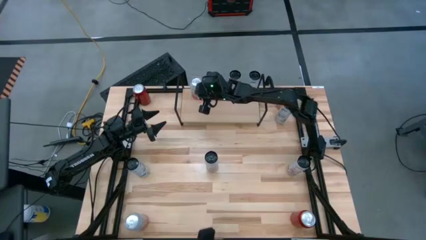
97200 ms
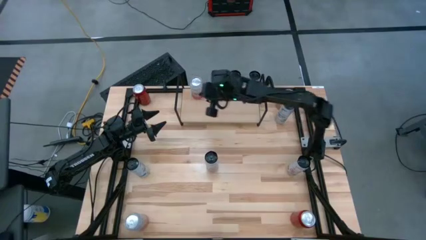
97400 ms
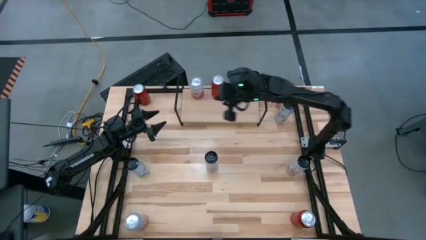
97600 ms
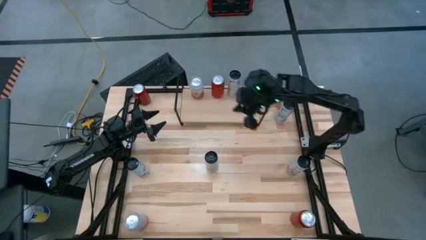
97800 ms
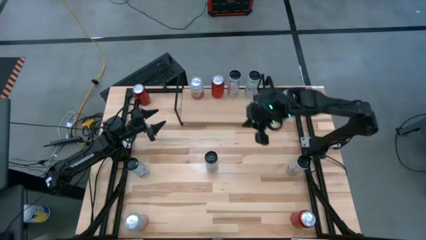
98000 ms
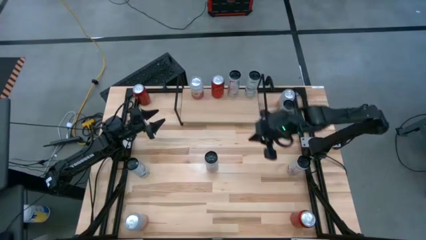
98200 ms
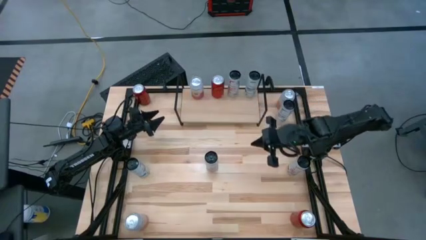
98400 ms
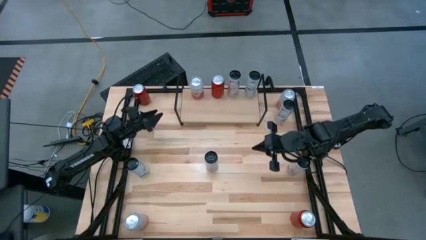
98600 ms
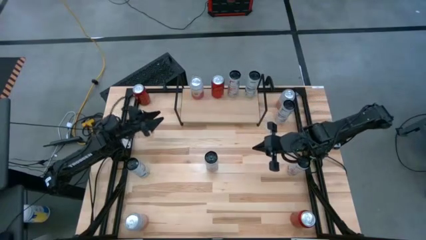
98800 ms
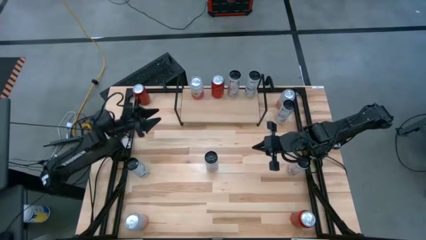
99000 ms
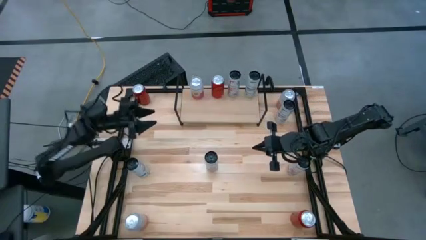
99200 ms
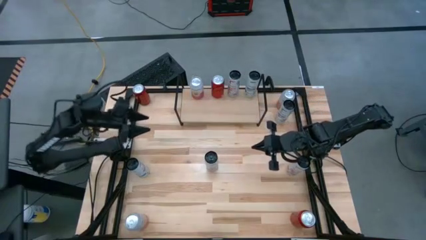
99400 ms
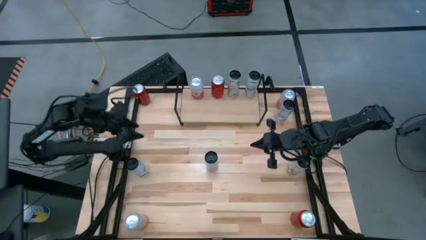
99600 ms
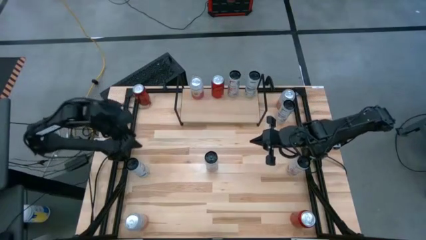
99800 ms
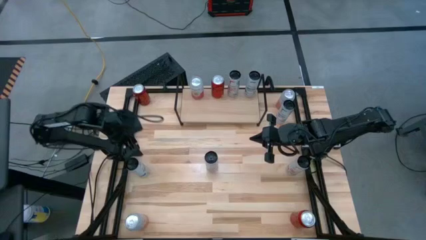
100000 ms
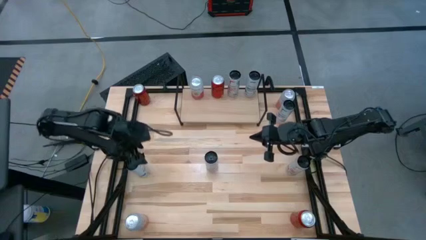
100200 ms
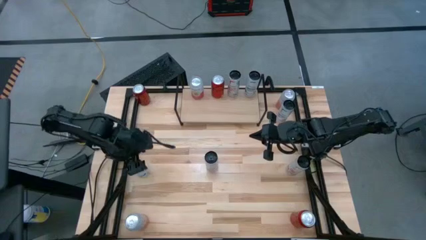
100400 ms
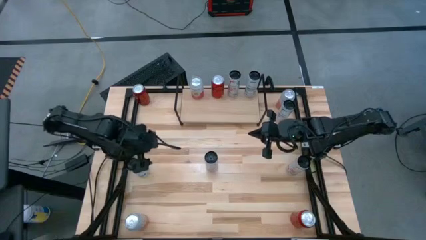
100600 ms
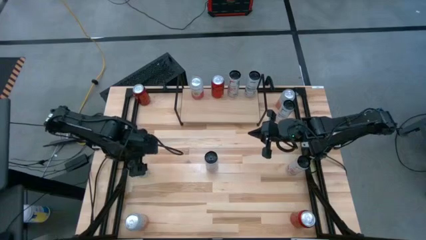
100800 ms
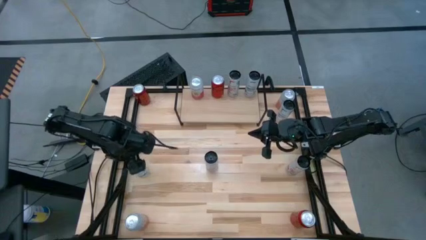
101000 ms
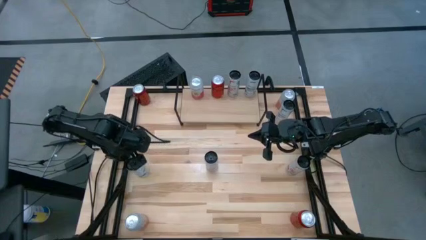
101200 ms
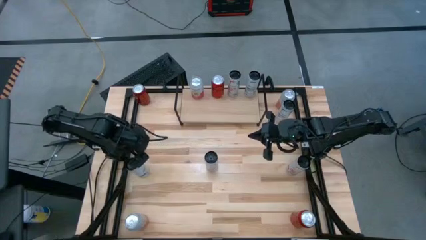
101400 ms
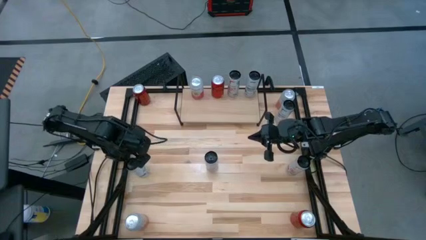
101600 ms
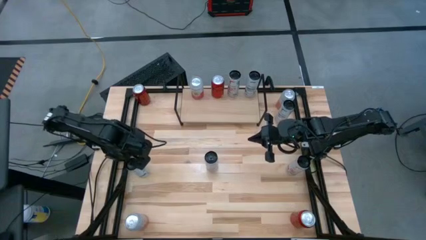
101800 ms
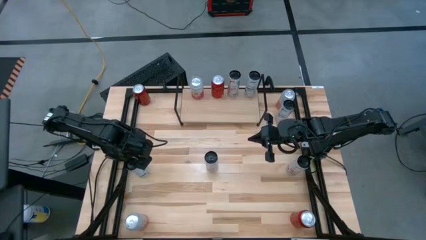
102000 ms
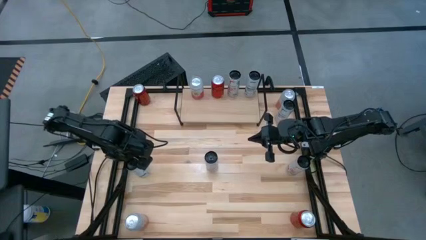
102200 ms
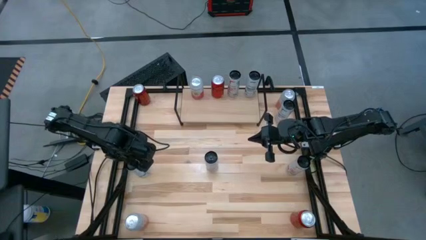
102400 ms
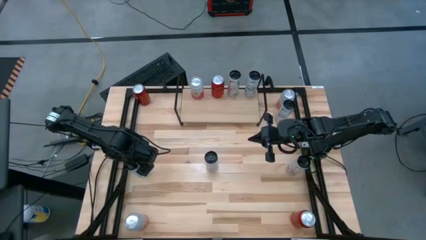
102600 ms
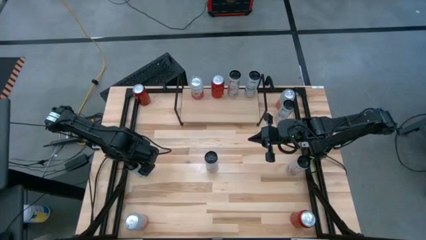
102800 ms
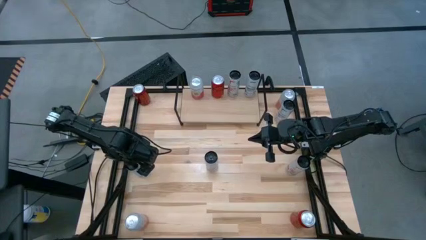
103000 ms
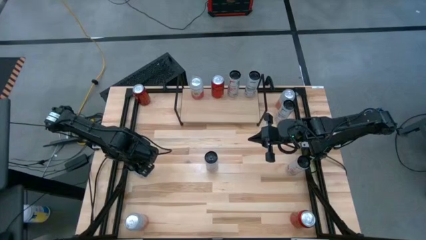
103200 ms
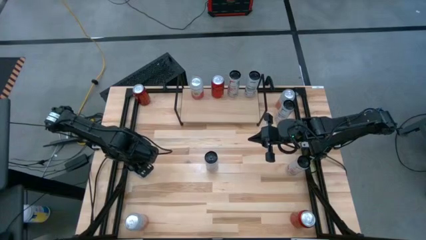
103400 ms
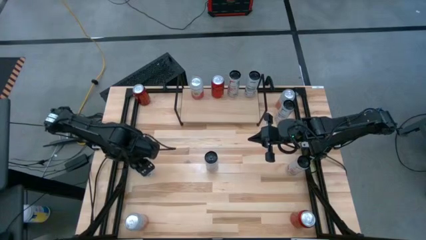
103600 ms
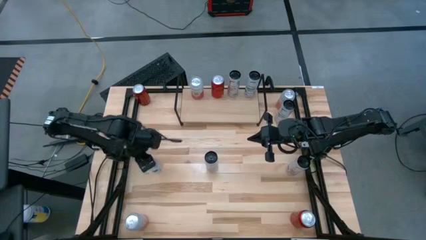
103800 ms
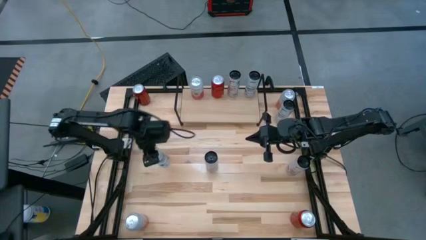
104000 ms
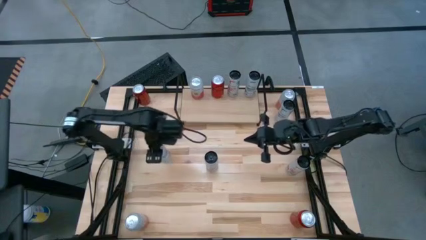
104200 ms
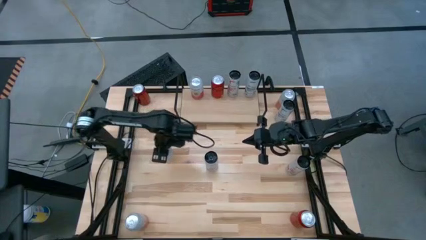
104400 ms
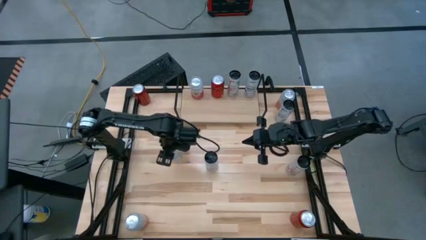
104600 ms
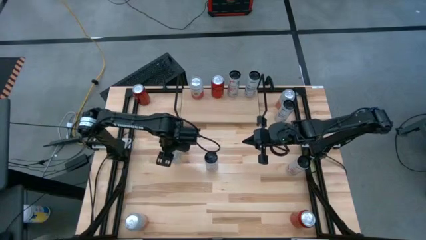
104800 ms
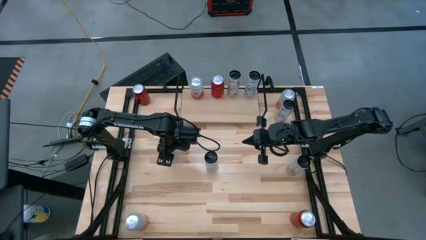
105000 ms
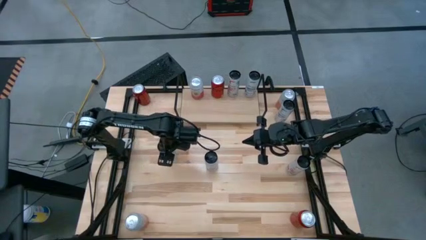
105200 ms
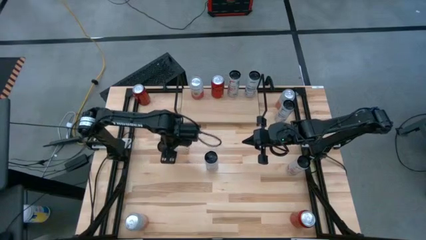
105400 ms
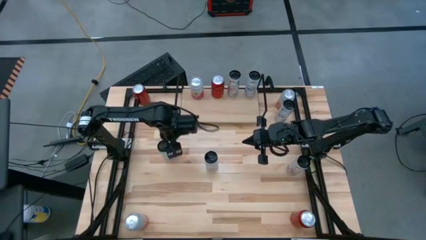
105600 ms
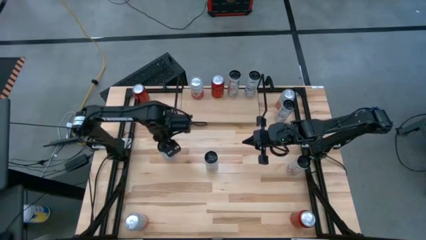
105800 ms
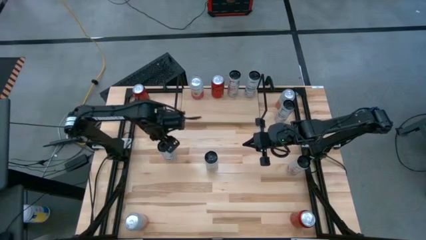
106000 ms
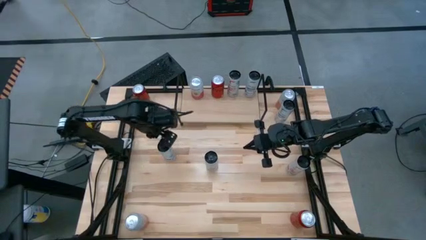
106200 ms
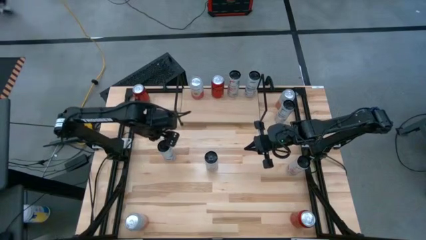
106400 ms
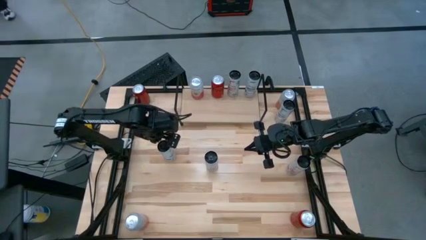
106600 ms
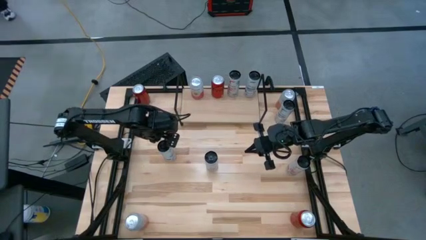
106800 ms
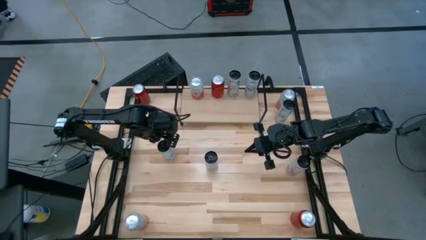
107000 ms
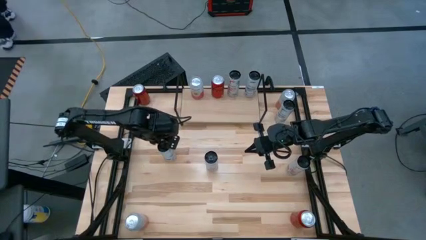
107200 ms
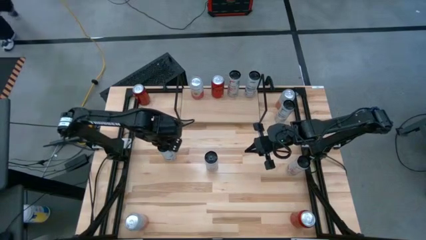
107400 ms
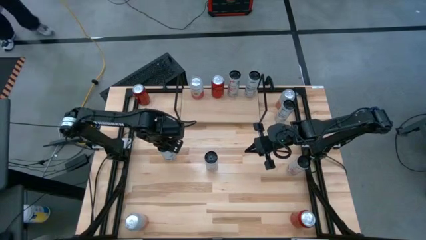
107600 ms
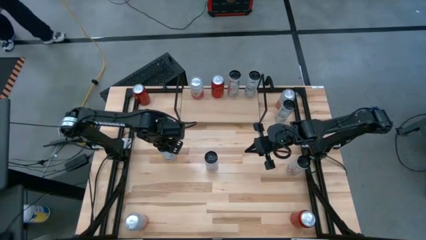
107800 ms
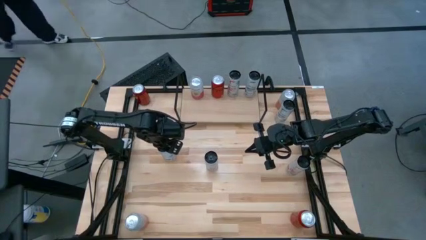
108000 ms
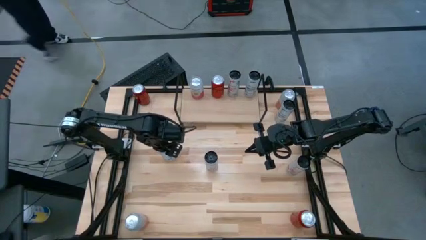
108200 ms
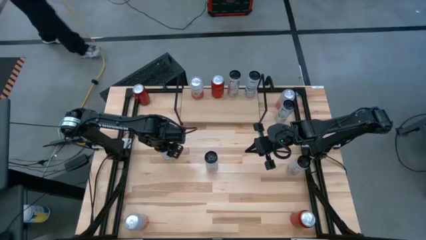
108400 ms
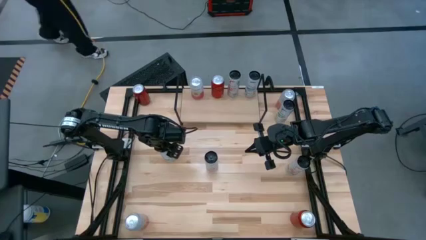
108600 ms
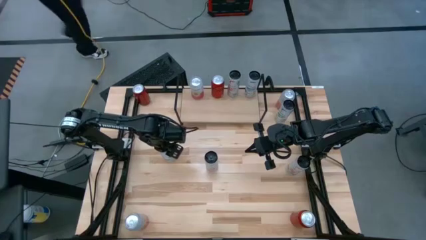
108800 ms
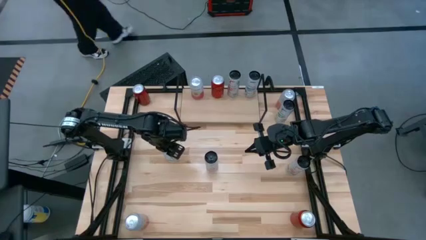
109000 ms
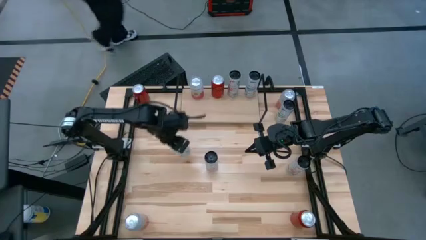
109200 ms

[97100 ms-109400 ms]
Task: Place canned beverage on shelf
Put the left white blue soda can on the shelf aligned with the other white blue soda can

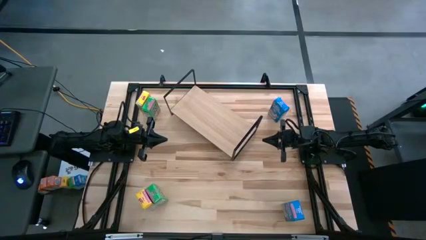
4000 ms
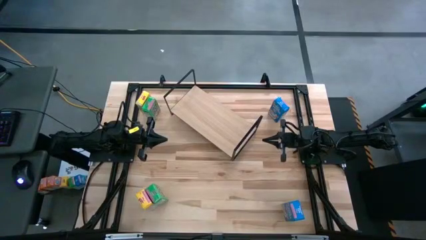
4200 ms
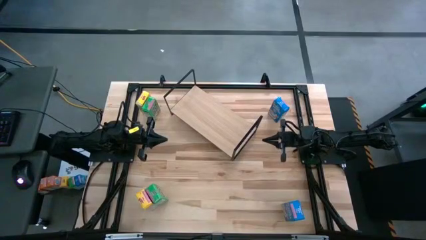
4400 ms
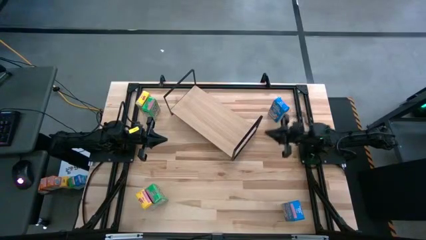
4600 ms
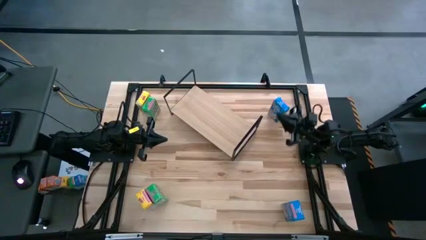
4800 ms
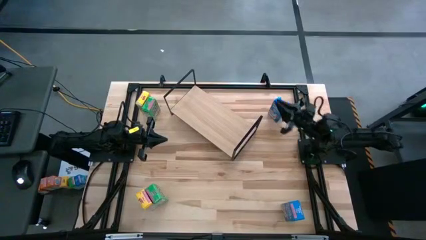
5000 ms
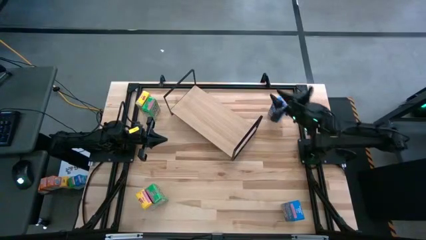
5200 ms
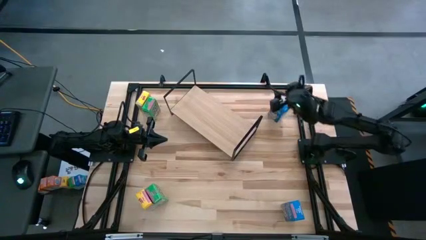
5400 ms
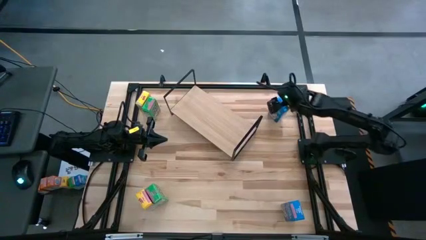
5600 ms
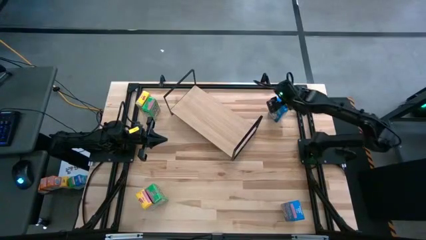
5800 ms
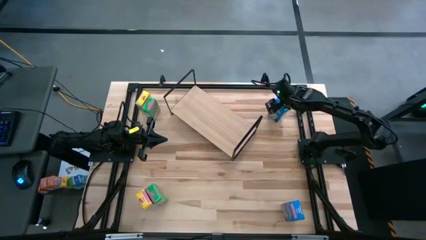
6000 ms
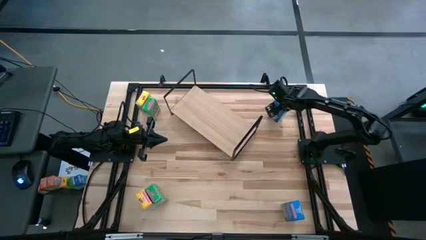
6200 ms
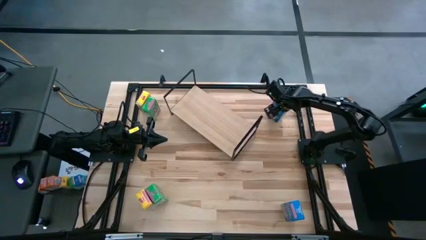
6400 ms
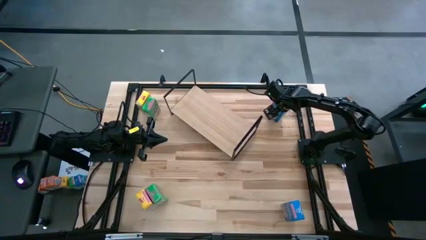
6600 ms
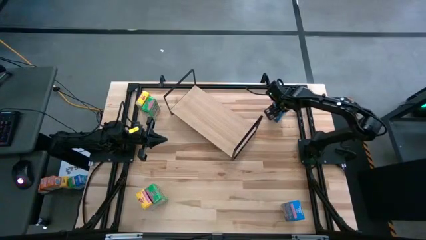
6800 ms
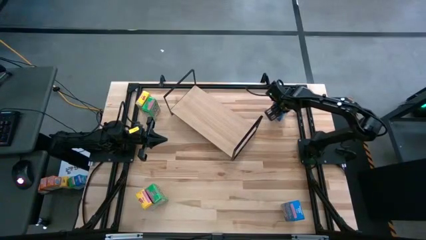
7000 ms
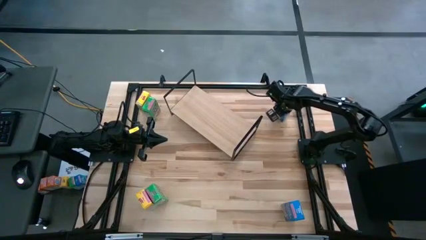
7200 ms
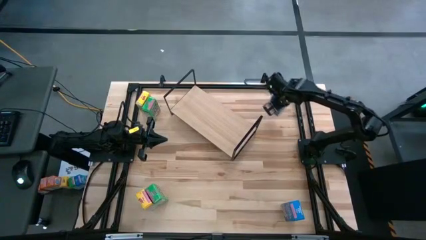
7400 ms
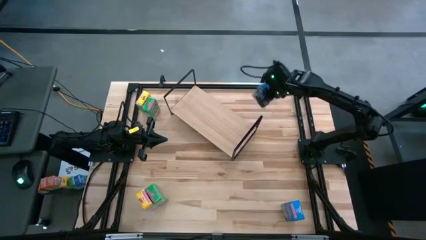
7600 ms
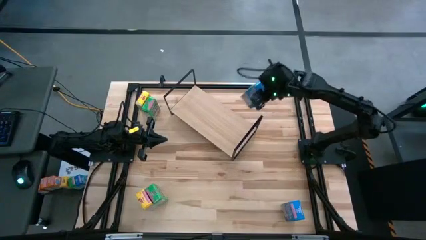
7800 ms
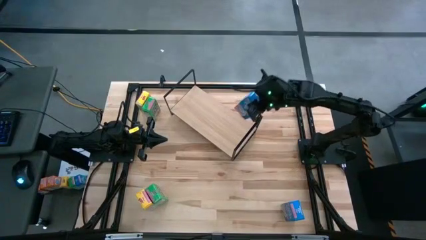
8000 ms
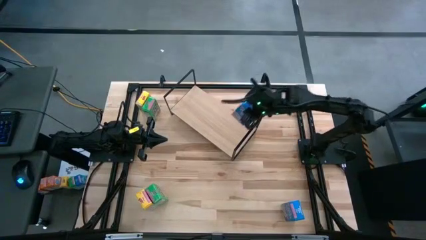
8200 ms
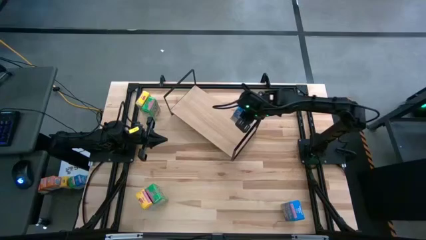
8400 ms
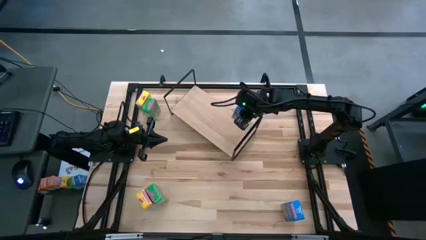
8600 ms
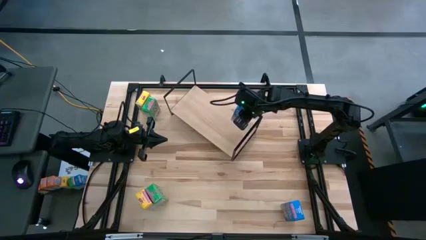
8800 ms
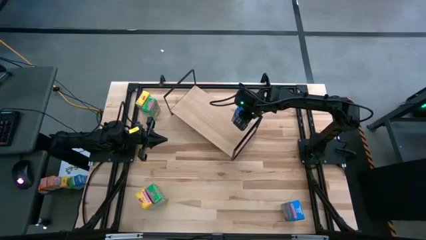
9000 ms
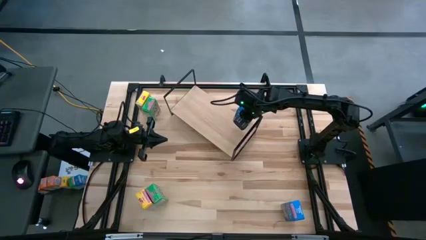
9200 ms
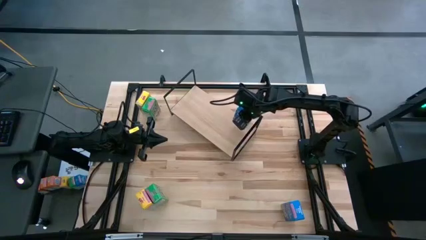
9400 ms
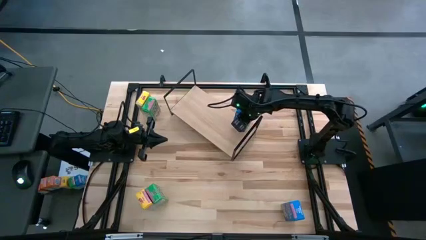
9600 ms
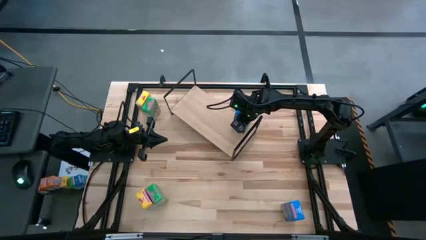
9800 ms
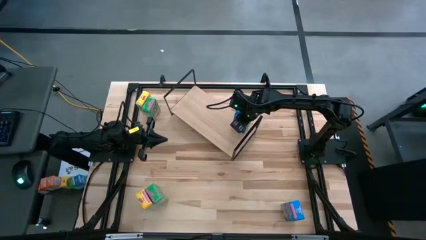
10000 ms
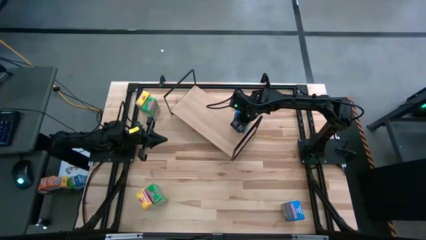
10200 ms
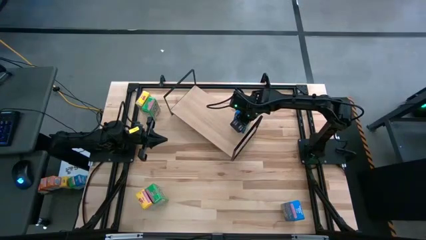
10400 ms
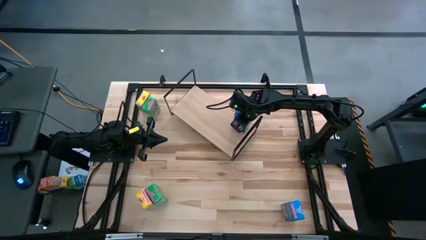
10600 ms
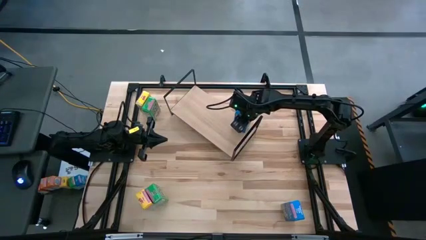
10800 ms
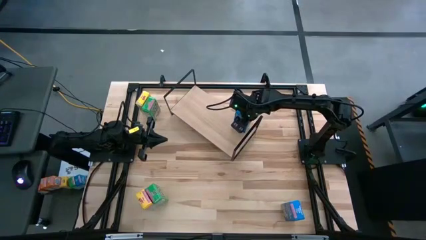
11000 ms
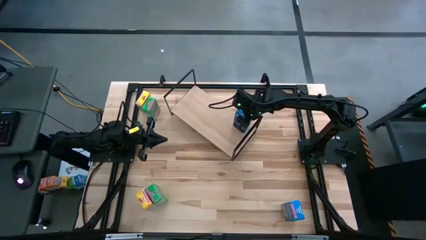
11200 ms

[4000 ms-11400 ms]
Task: Stack cereal on shelf
Put the top blue cereal box on the shelf
